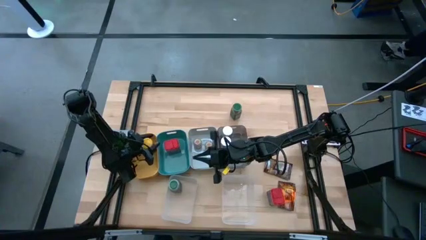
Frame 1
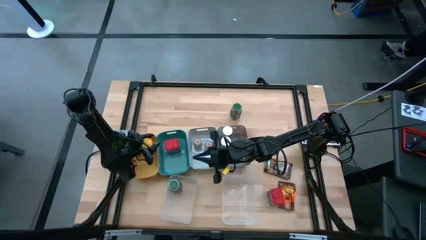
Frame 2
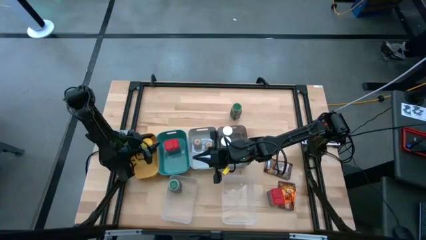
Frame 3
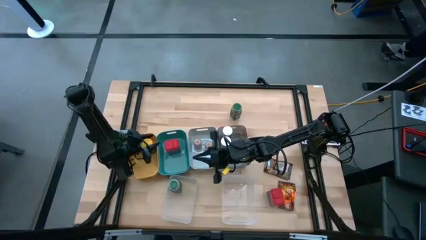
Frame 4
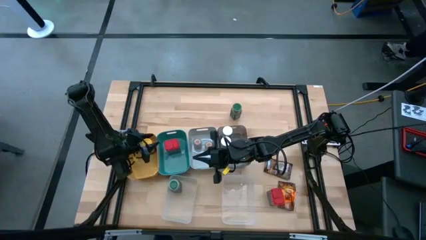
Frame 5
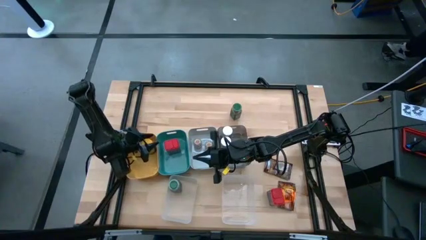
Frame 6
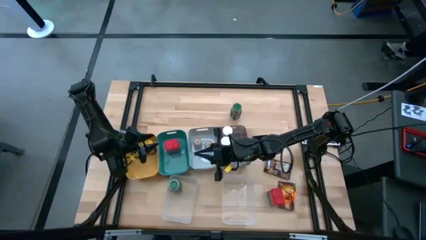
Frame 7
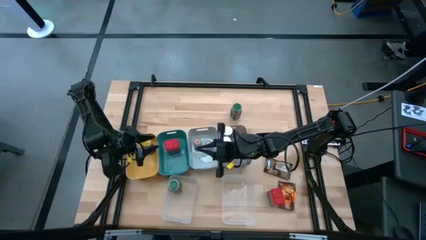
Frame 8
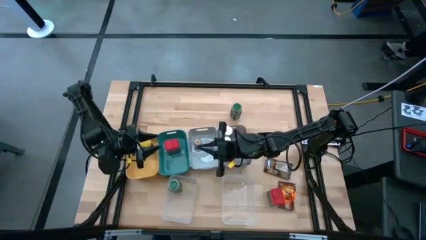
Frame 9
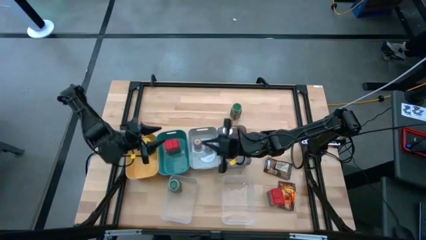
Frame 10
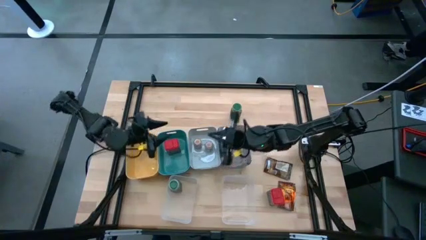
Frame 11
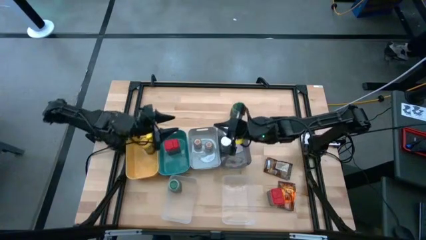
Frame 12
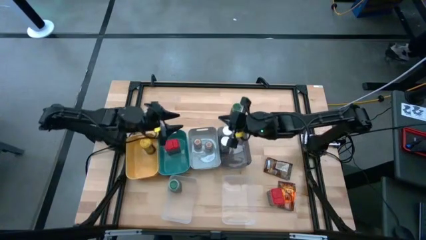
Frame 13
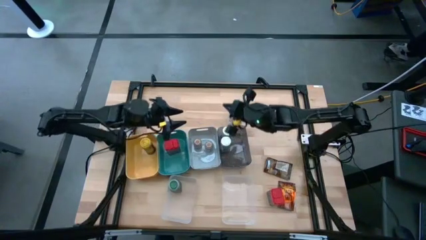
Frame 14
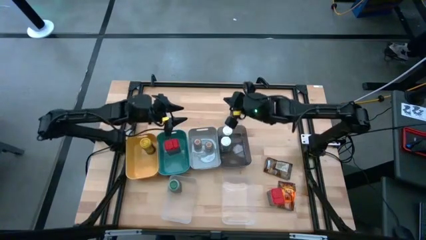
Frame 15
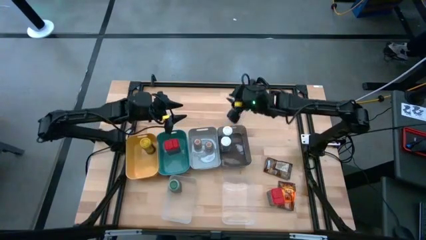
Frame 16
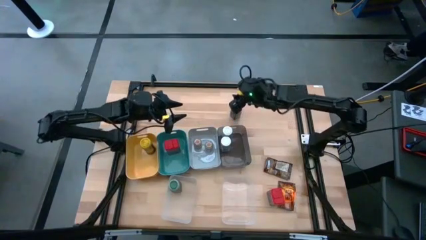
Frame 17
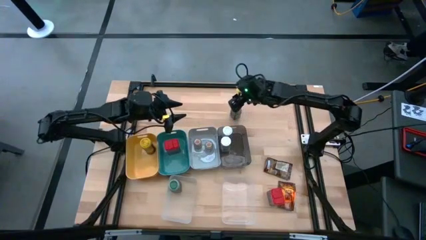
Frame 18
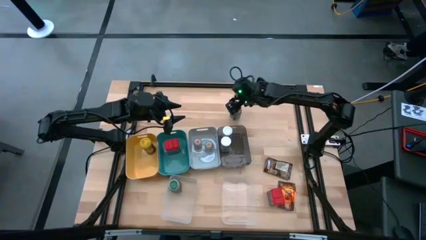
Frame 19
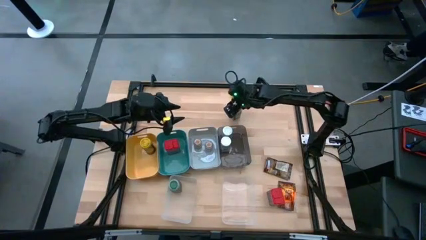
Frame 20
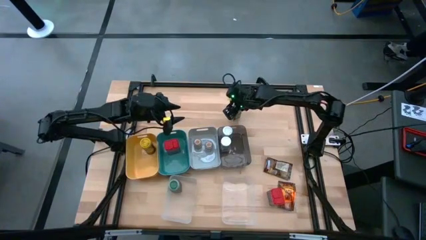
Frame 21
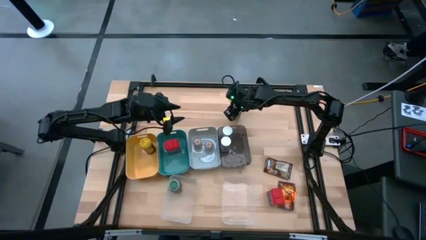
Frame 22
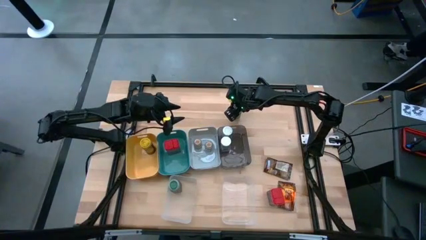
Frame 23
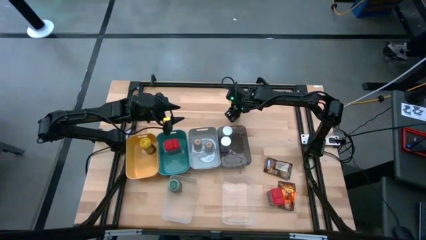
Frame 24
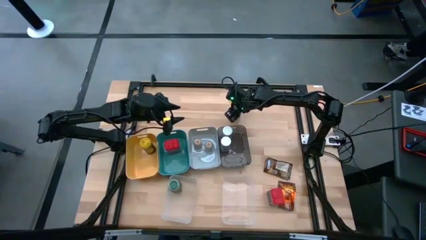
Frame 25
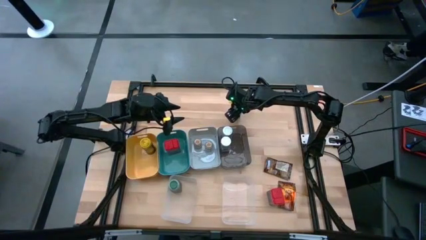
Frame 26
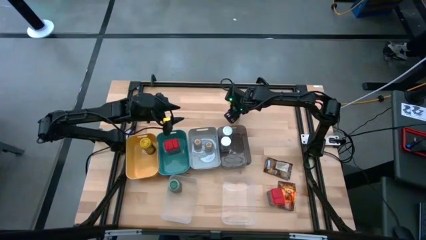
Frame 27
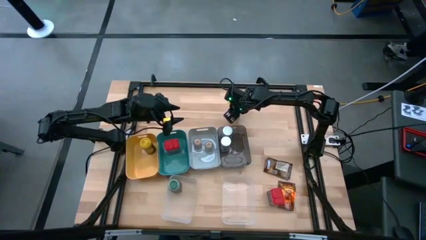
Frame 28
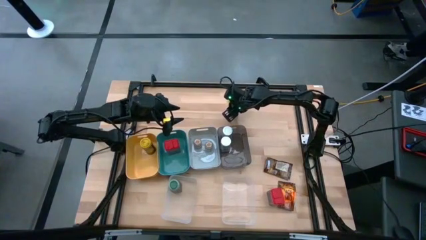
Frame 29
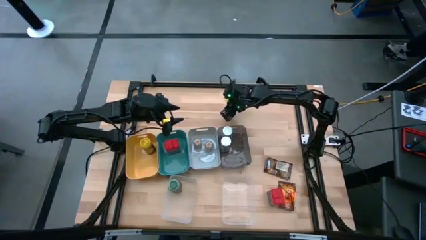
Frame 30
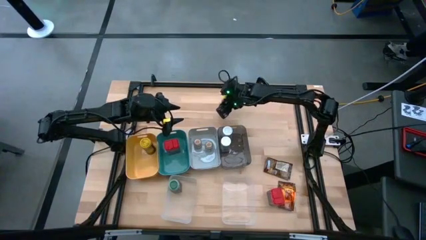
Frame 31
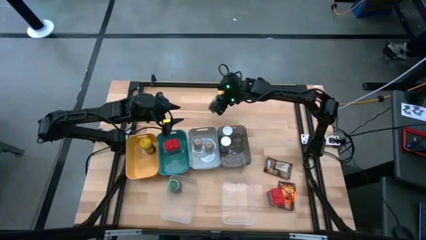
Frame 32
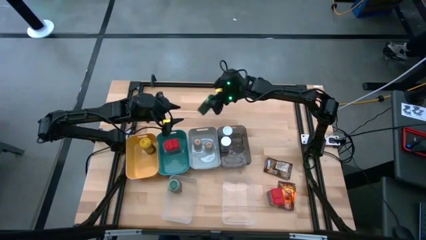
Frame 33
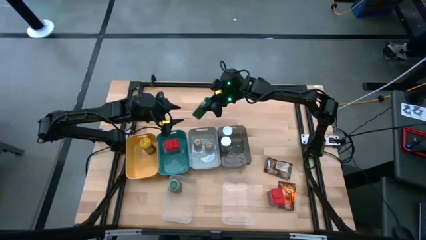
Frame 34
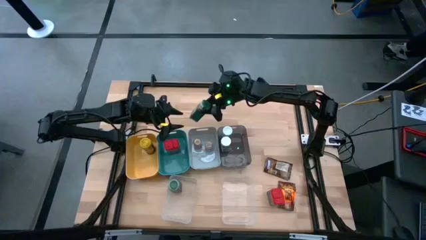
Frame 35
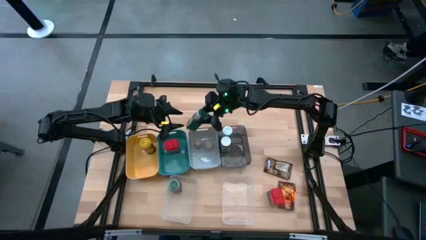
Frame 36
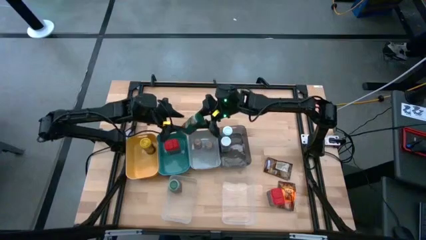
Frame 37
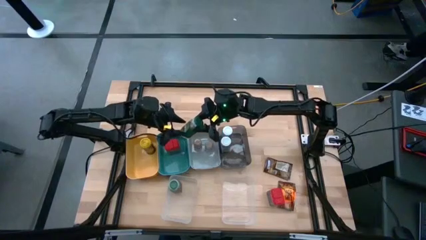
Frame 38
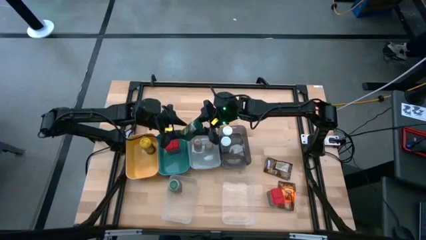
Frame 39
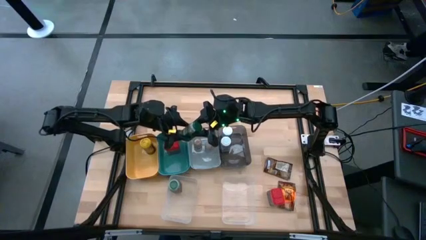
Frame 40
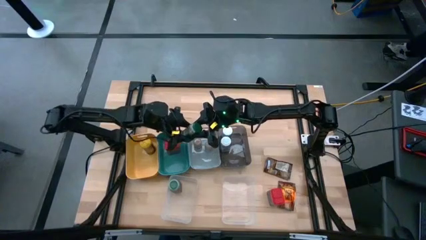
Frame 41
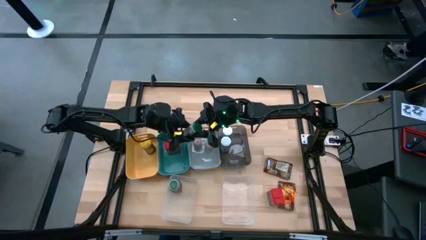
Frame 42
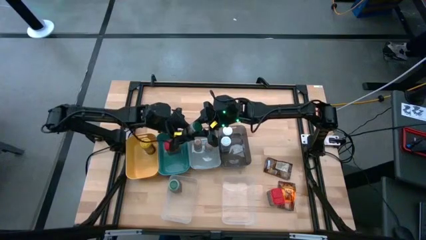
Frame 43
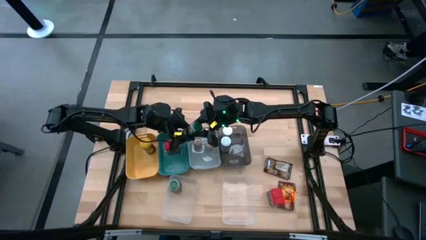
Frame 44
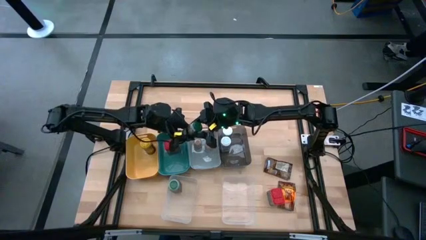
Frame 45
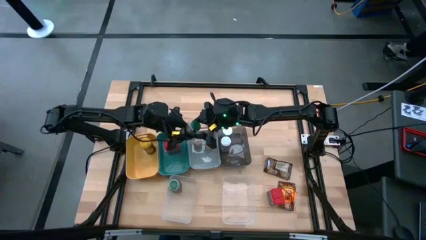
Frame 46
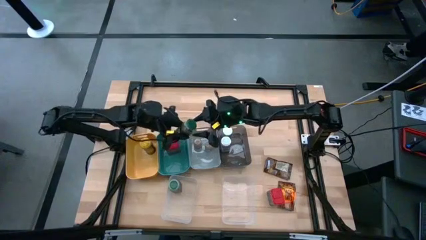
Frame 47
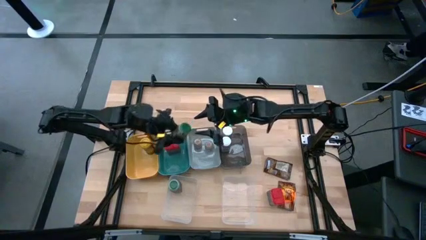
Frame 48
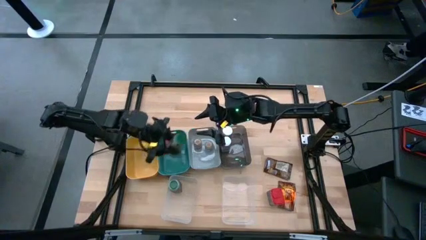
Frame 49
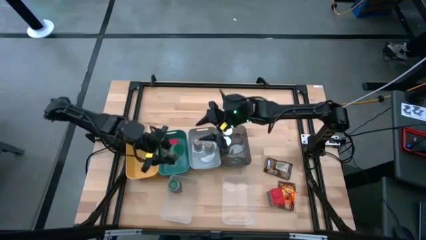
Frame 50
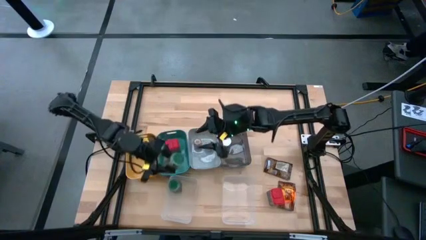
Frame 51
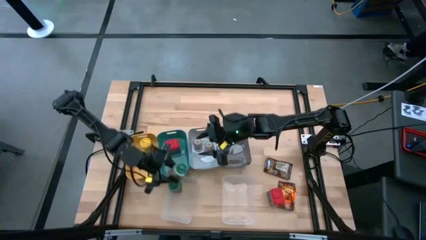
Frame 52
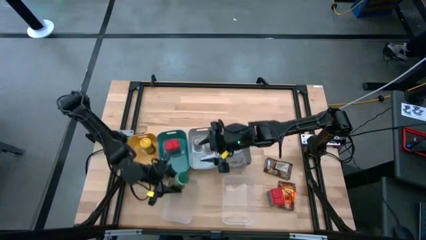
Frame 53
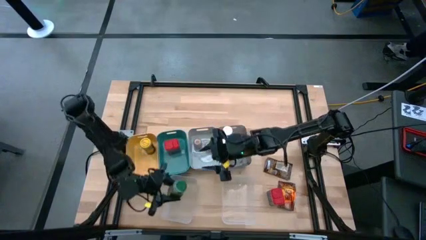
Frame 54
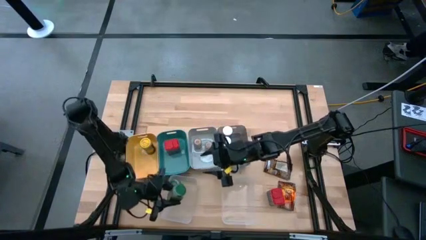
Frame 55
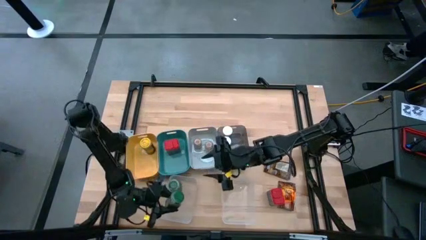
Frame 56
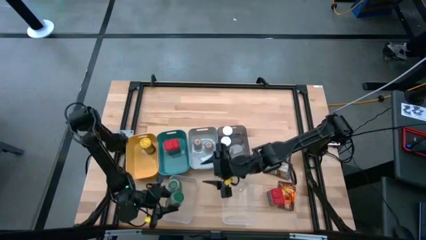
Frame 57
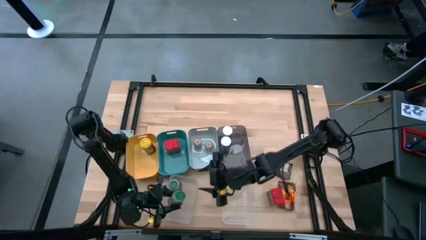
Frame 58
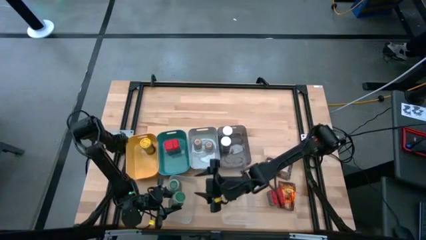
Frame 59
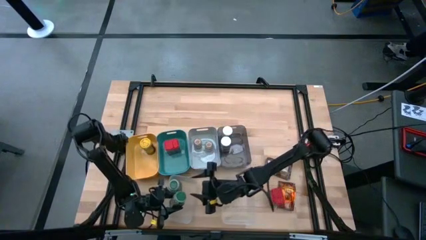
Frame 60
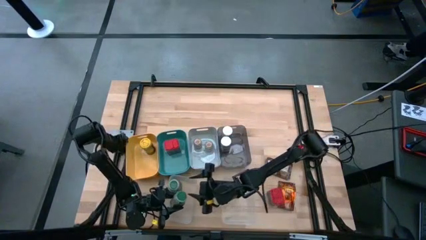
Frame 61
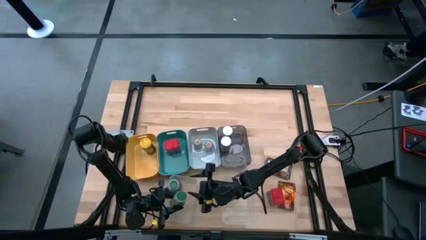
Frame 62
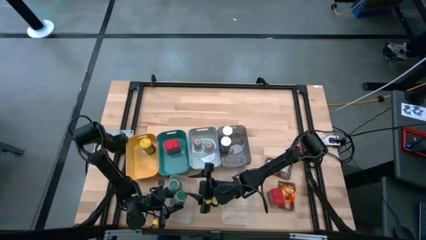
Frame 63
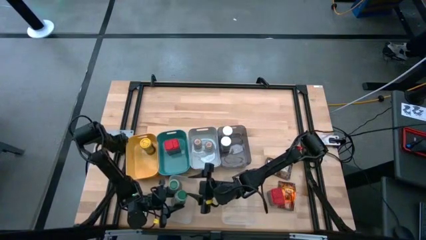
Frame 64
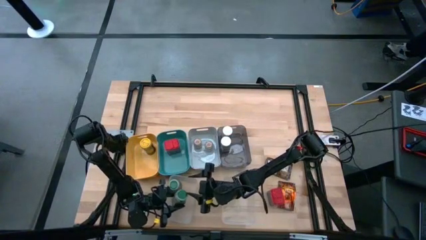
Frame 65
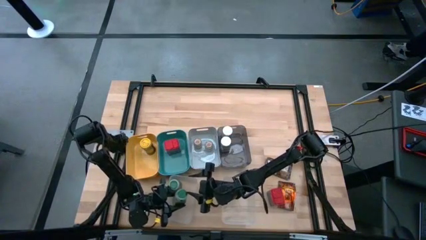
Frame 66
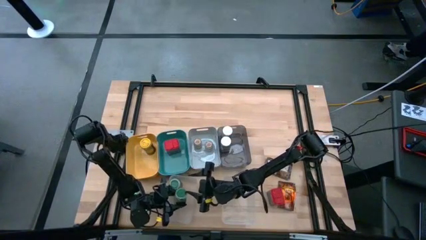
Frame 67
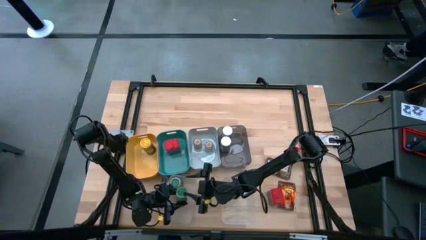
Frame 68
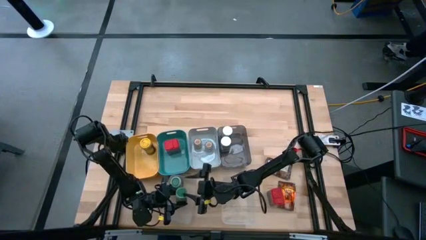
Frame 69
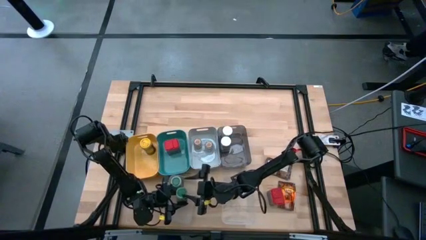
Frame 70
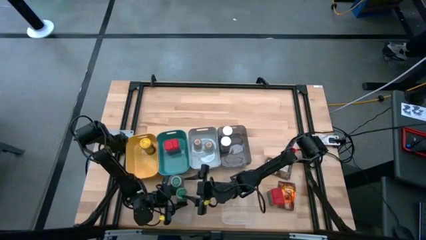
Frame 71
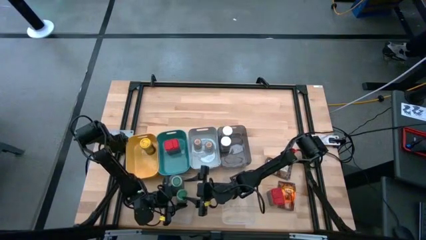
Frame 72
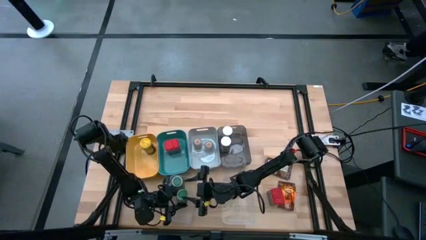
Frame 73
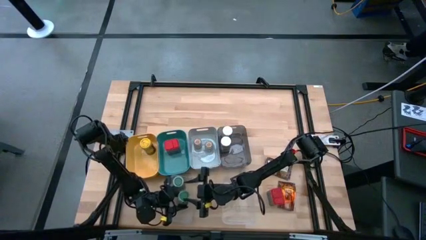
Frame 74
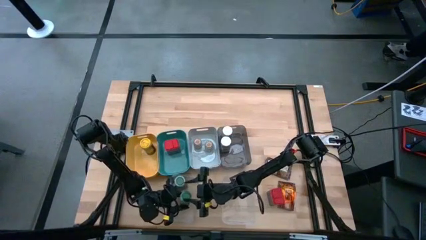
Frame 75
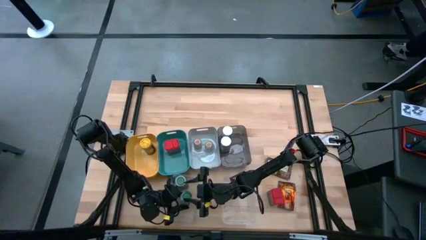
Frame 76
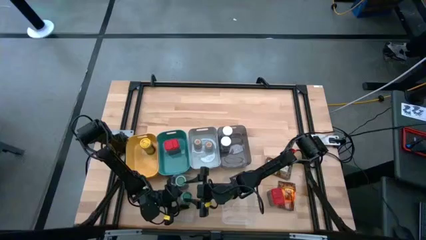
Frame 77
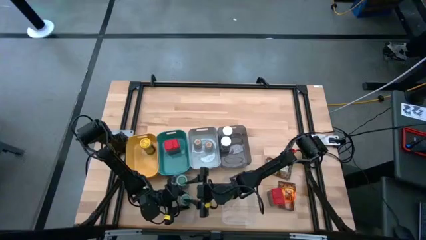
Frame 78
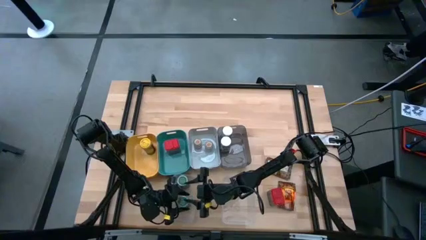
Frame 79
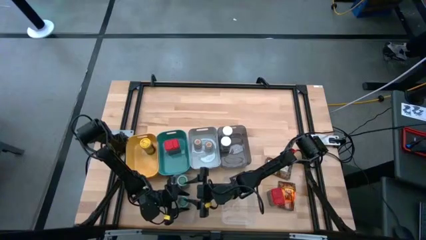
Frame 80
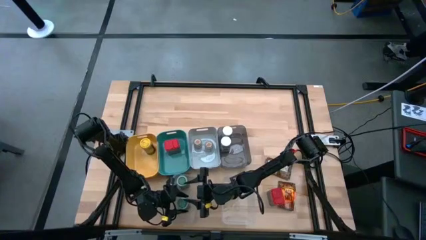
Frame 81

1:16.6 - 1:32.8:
Task: Sort spices by type
Put the green seasoning bottle into the left transparent bin
